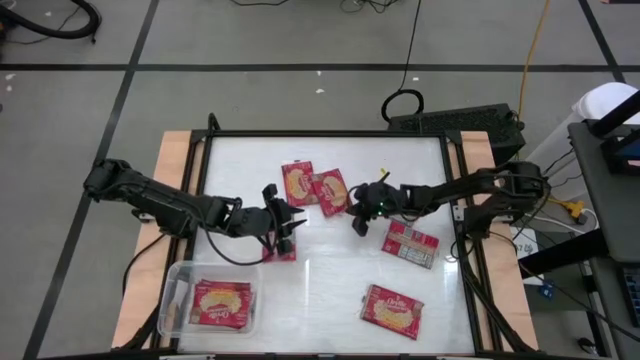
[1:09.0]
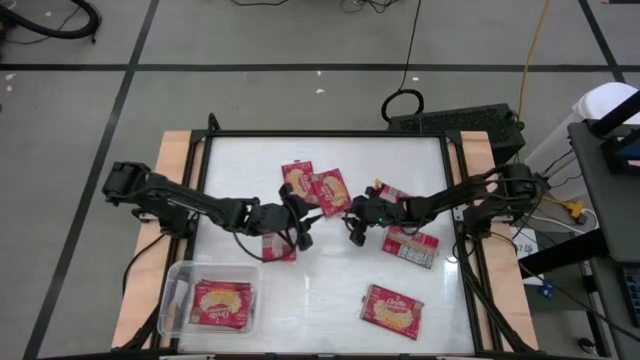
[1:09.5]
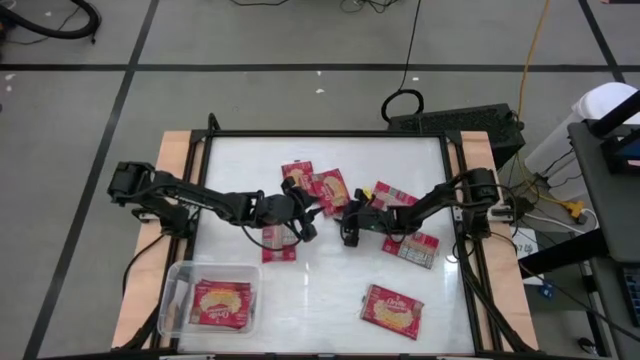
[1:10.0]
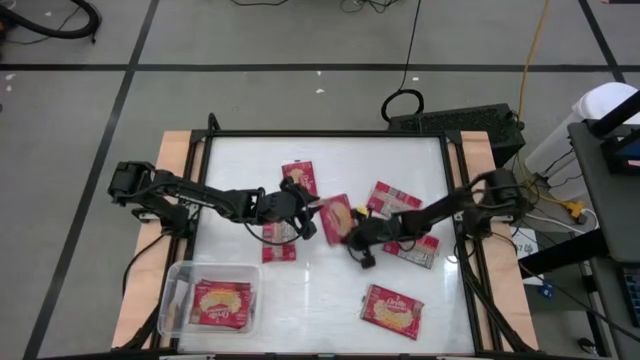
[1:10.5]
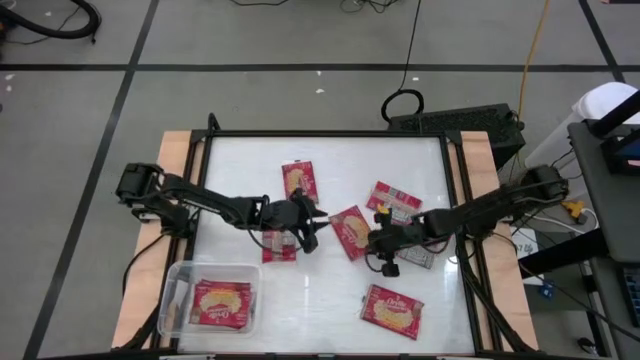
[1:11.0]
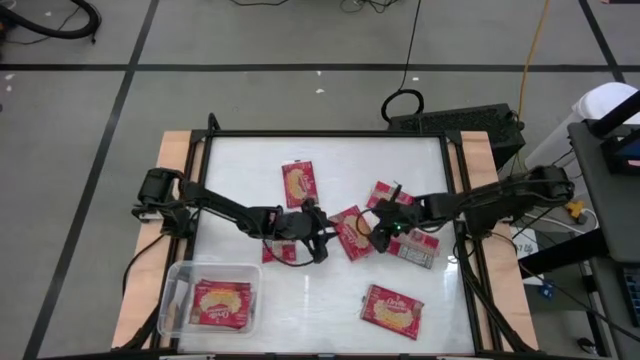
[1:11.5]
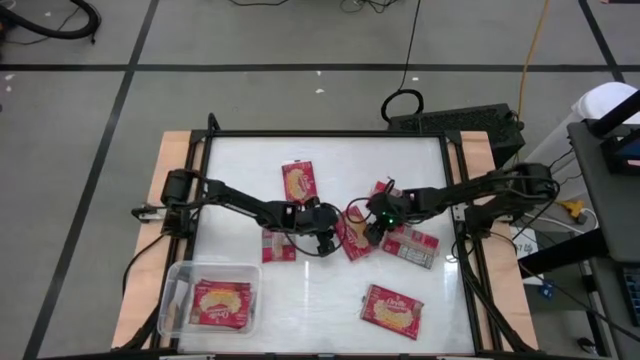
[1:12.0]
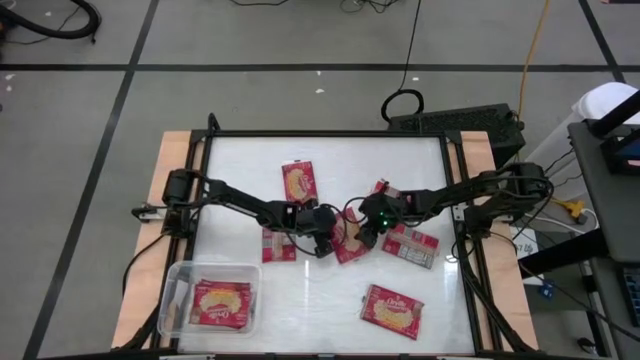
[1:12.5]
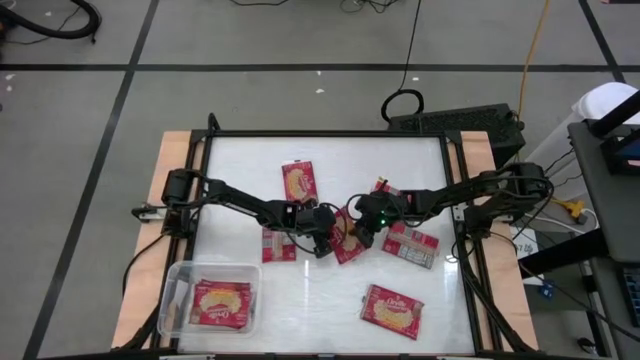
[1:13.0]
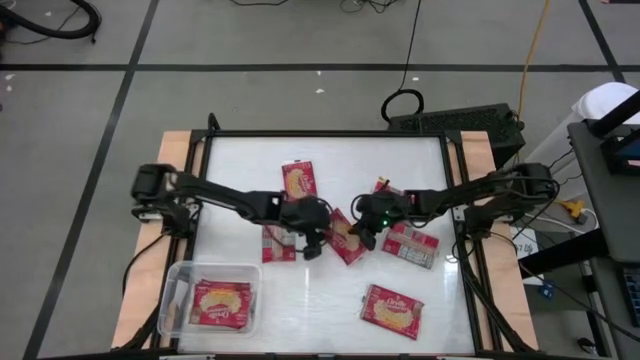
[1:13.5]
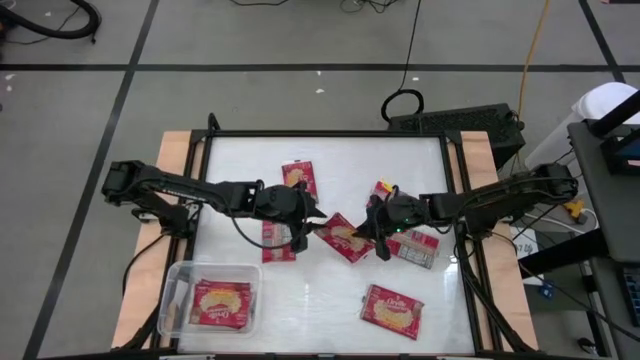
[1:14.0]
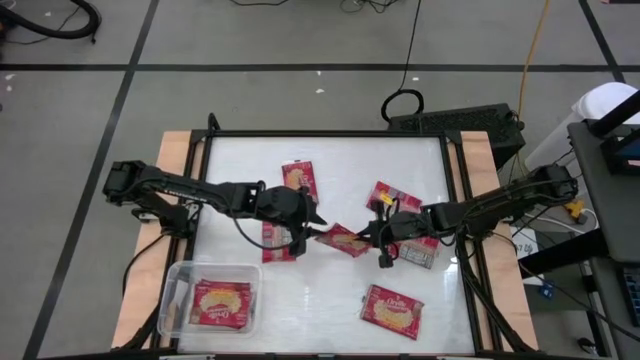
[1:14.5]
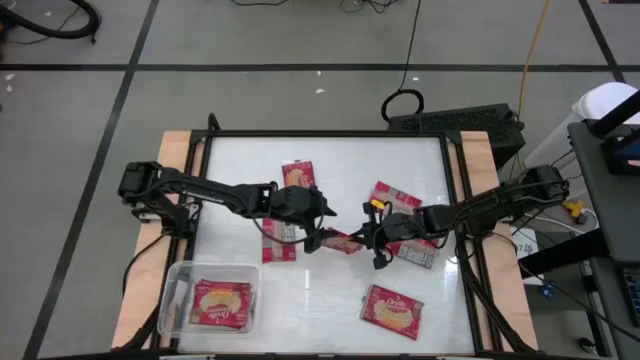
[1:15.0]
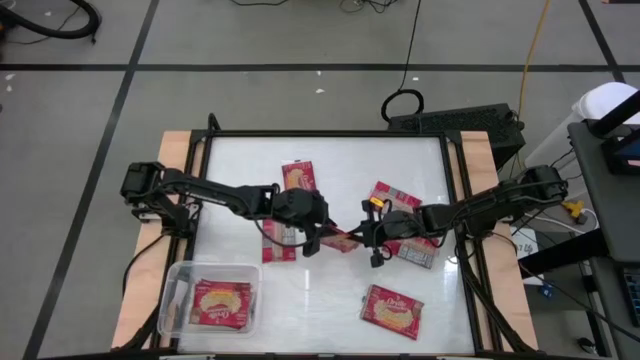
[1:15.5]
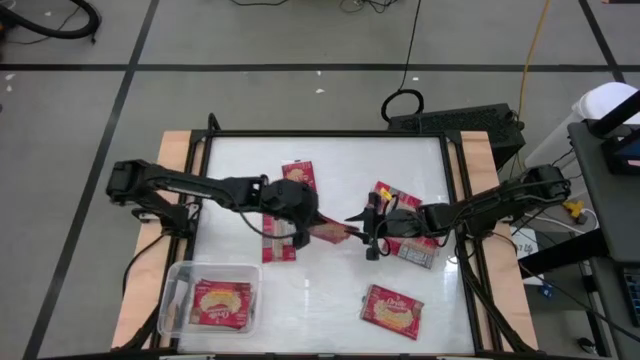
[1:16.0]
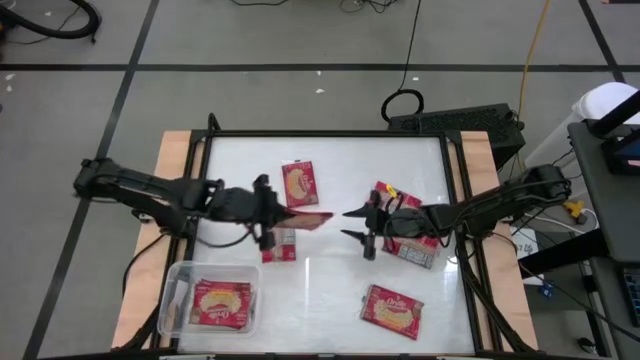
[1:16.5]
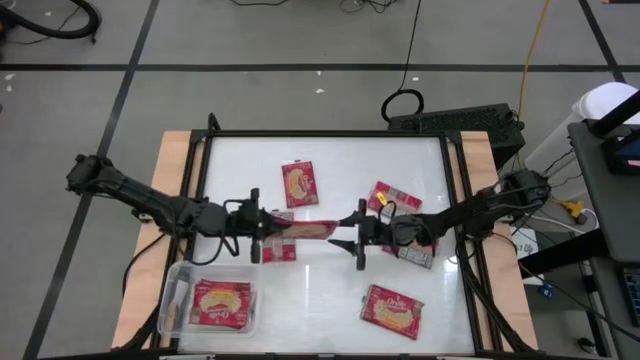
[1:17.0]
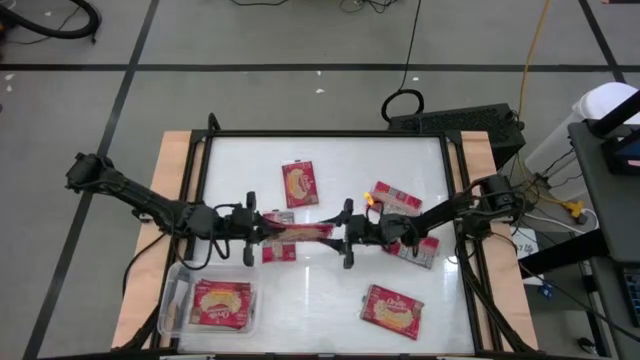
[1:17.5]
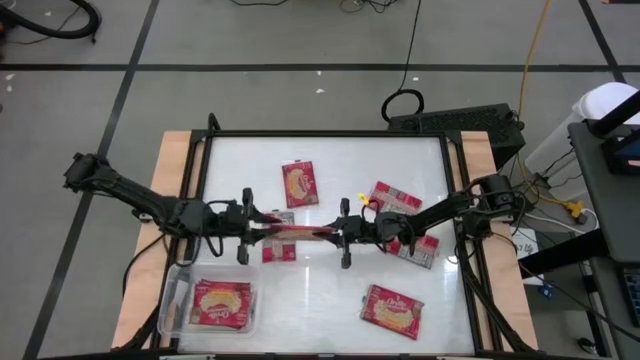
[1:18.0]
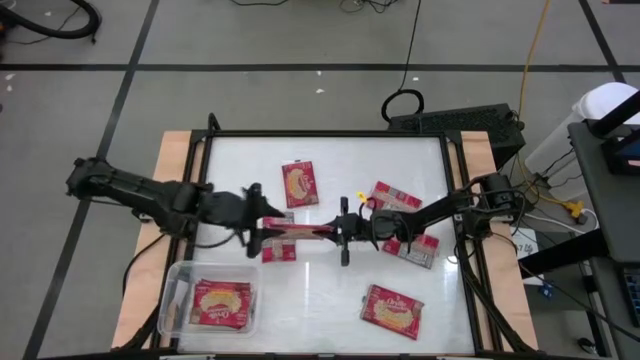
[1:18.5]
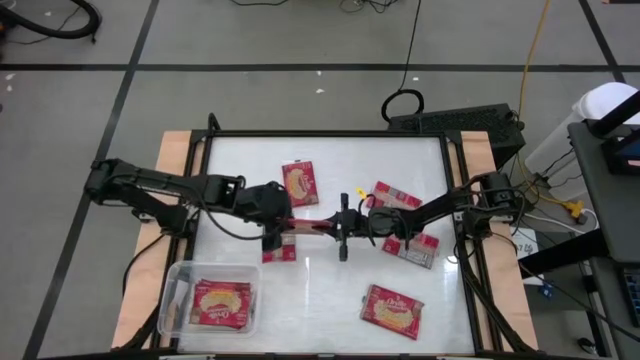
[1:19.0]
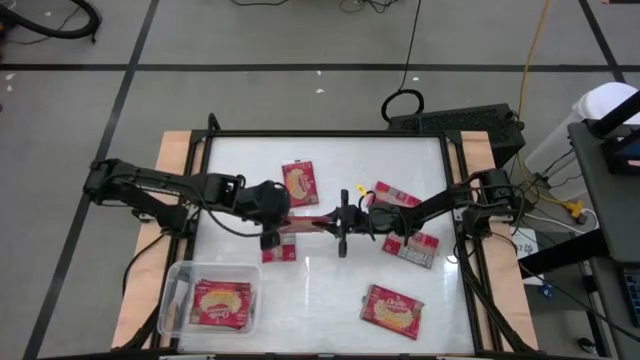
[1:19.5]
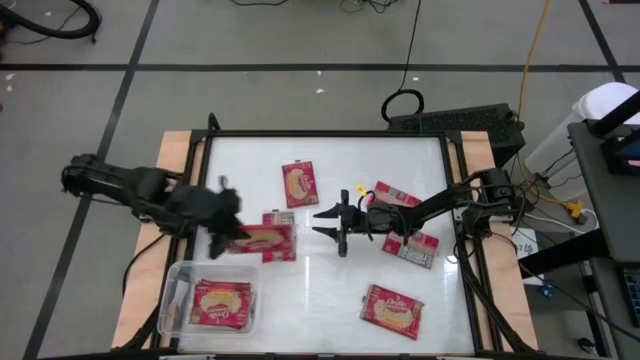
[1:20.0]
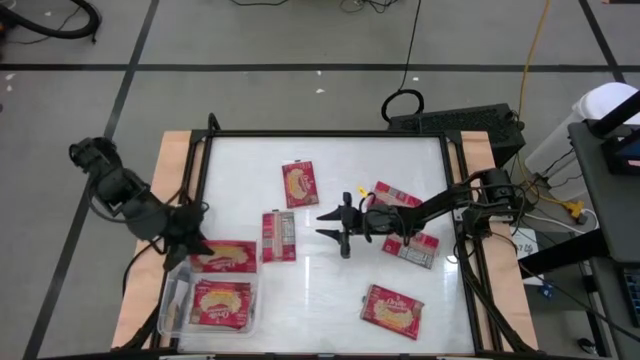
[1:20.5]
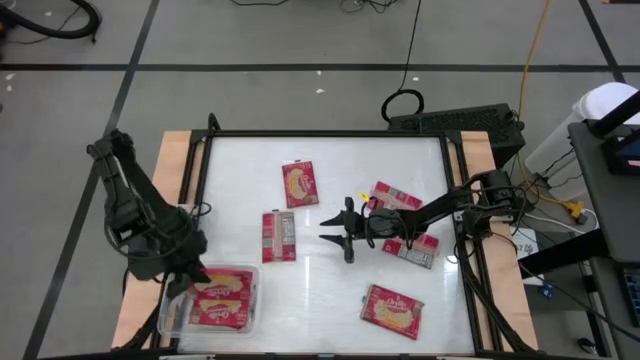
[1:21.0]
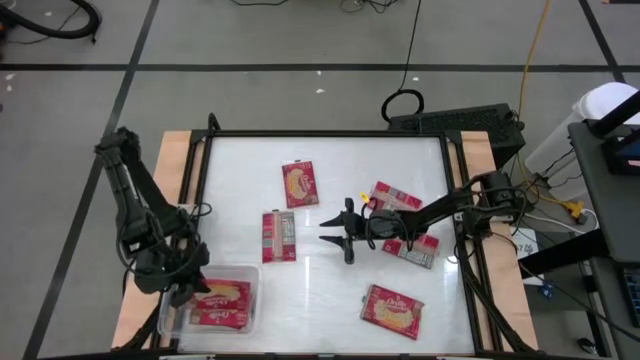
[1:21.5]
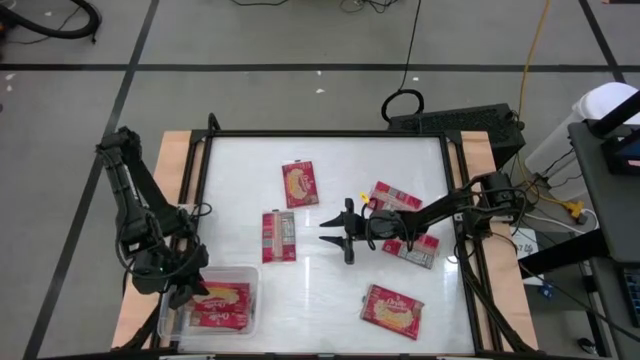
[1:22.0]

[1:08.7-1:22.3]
Task: Sort popcorn bags into baskets
Put the popcorn bag into the transparent bin

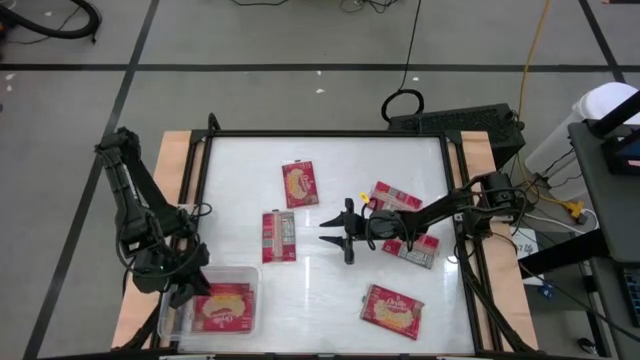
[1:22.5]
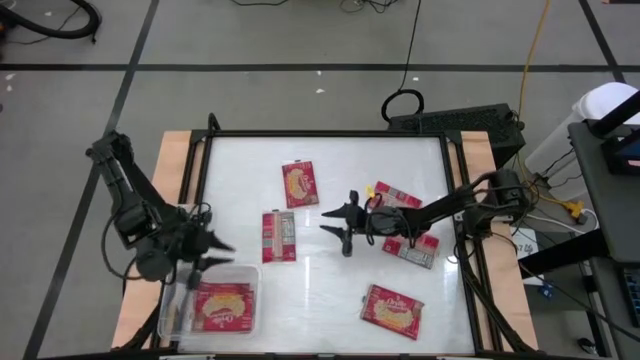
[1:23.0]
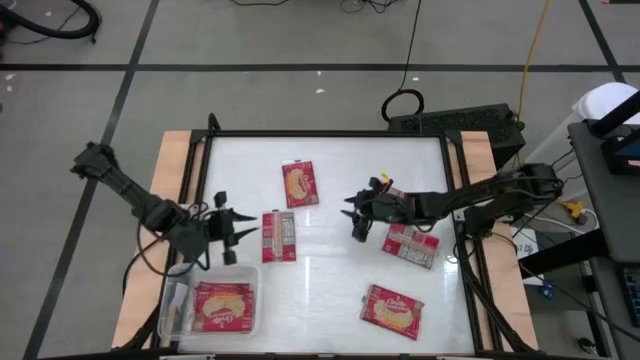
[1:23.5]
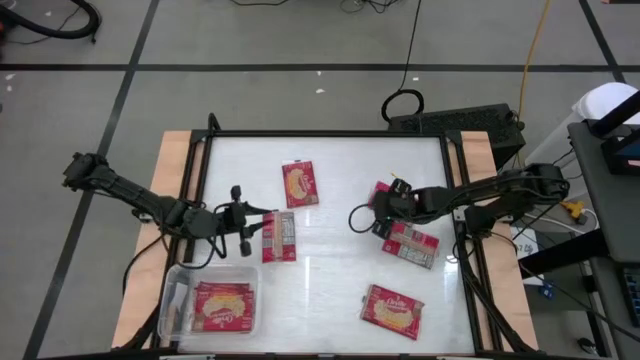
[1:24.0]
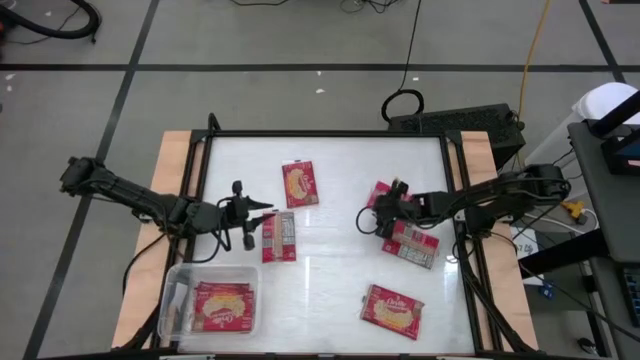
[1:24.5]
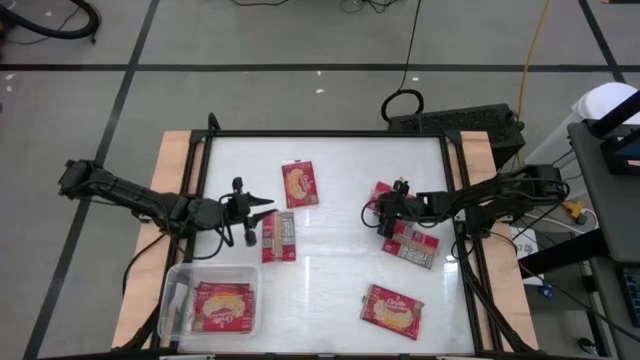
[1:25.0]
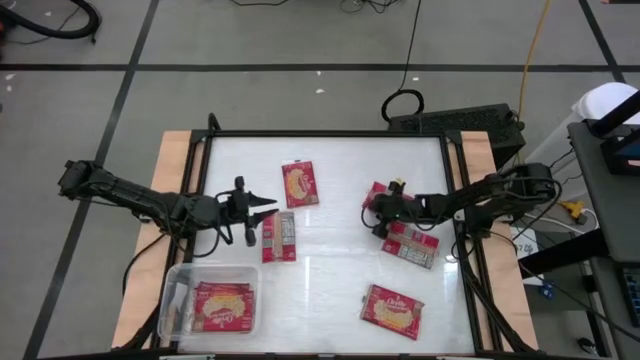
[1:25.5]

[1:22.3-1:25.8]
Put the popcorn bag into the transparent bin

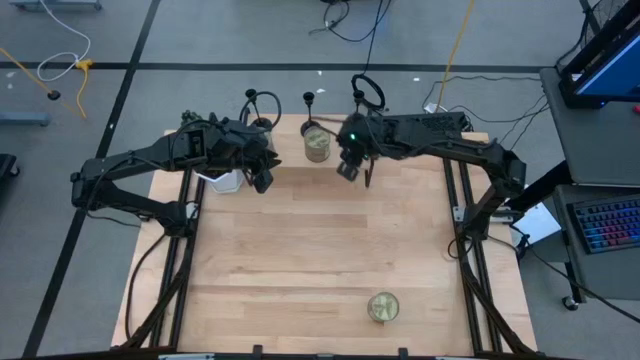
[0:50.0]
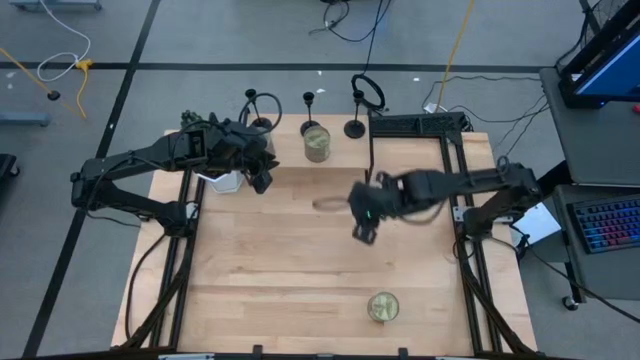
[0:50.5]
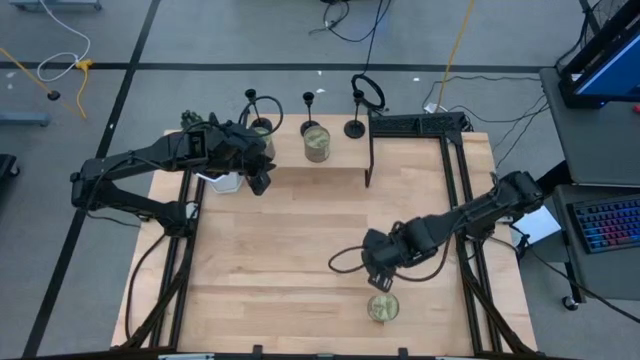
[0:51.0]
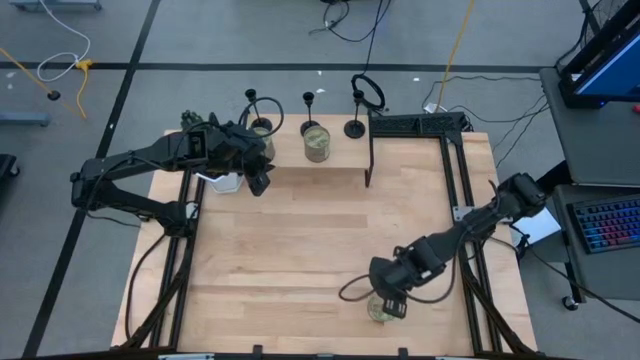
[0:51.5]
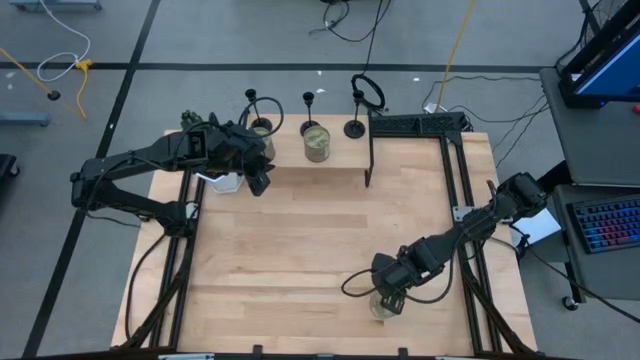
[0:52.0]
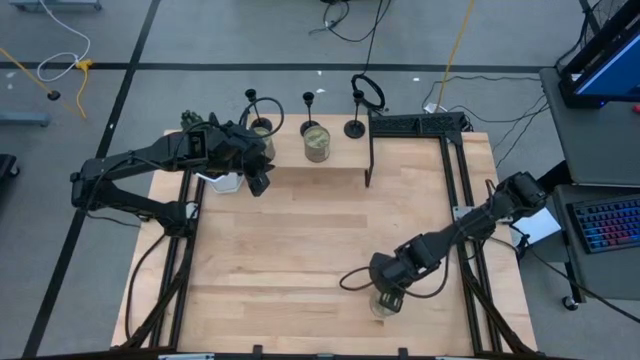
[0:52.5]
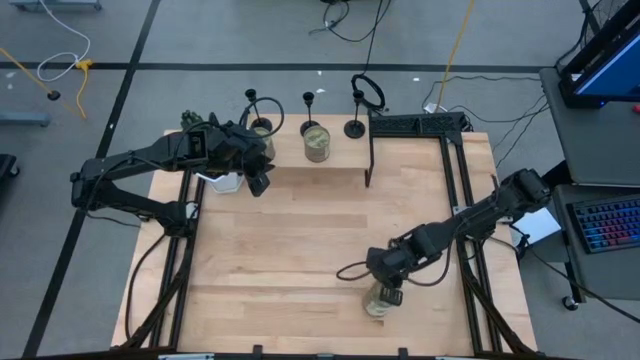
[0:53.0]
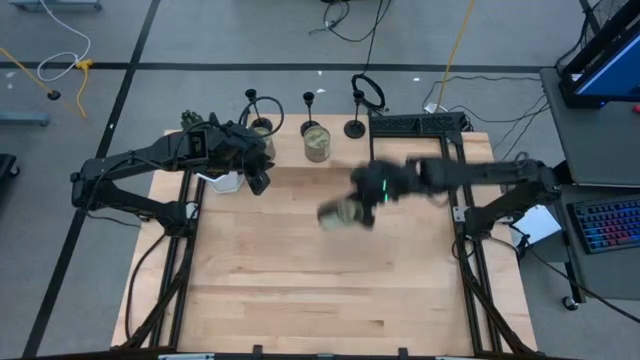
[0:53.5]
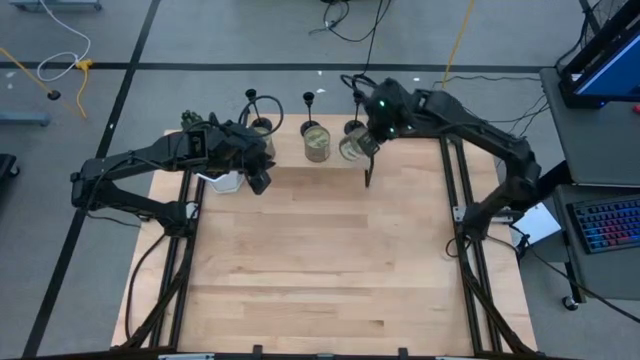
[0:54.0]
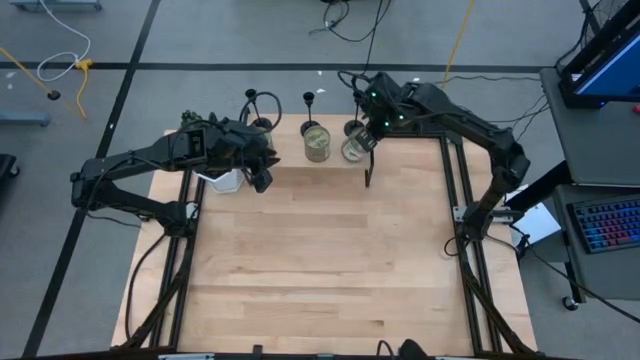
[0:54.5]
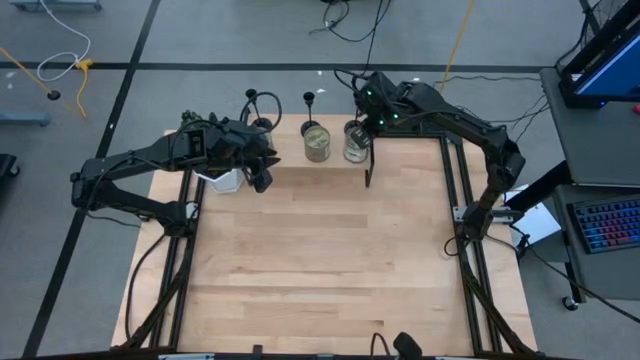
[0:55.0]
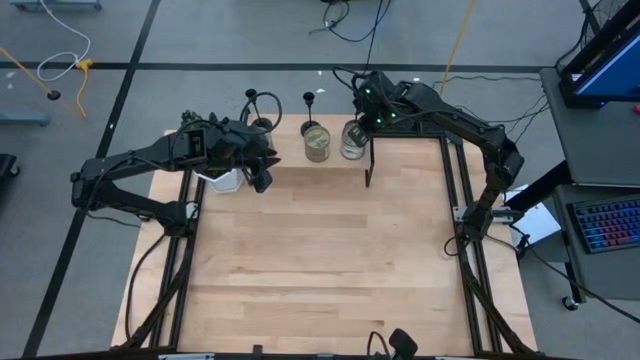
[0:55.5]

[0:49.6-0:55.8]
Task: Pick & Place candle stick holders
Put the white scented candle on the shelf aligned with the other white scented candles
